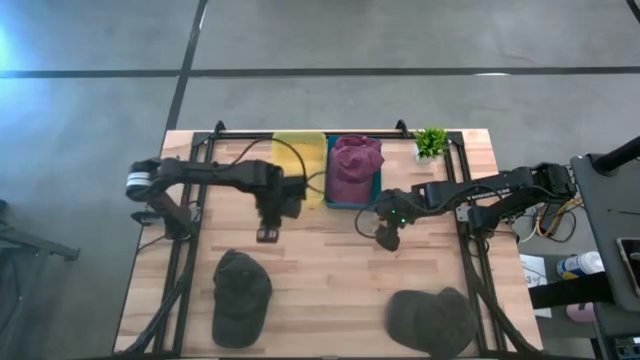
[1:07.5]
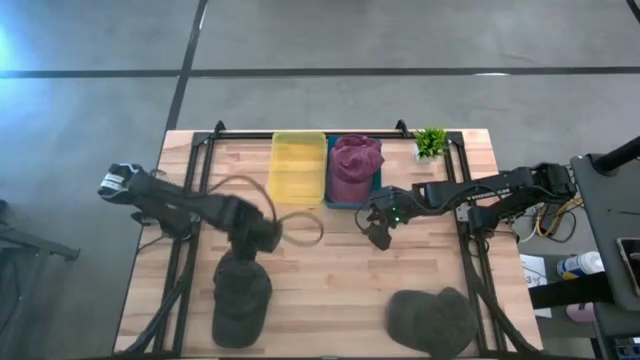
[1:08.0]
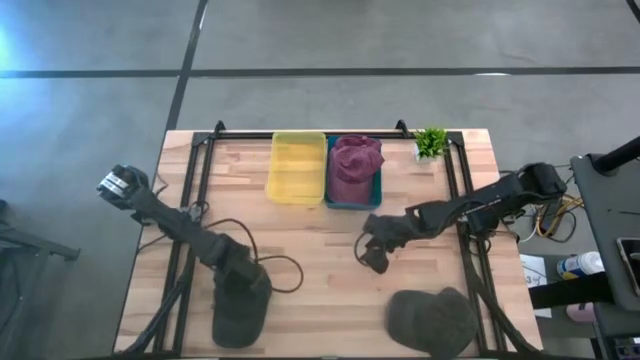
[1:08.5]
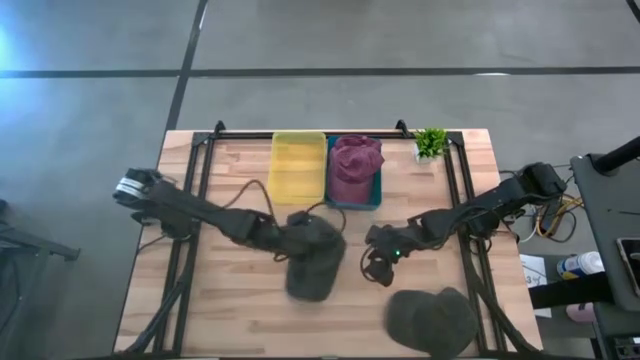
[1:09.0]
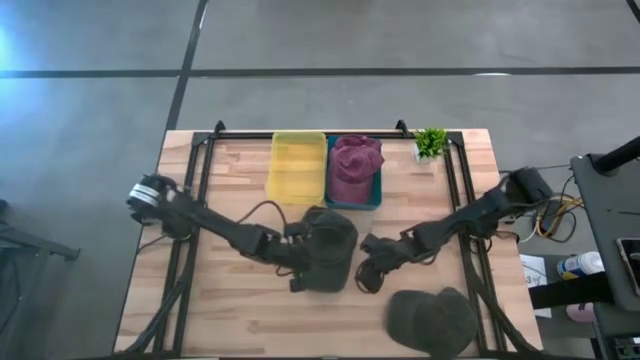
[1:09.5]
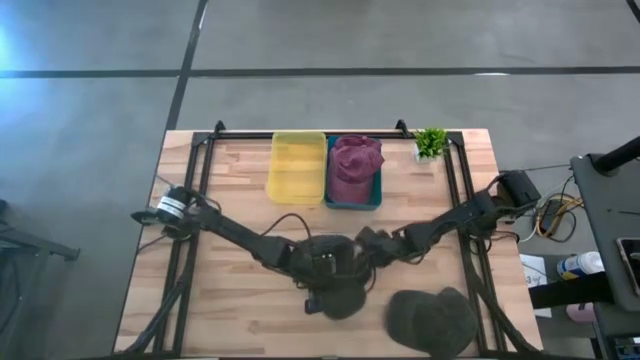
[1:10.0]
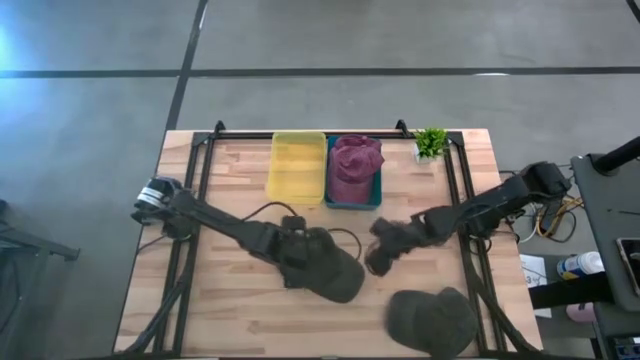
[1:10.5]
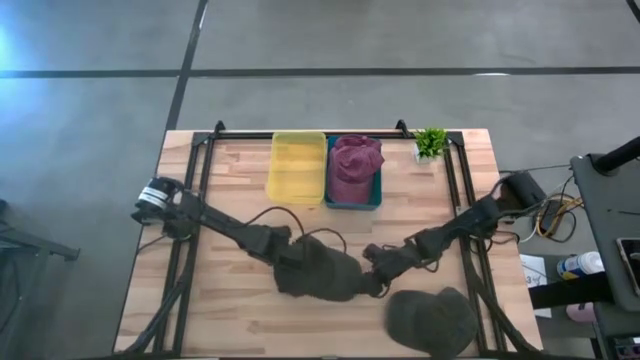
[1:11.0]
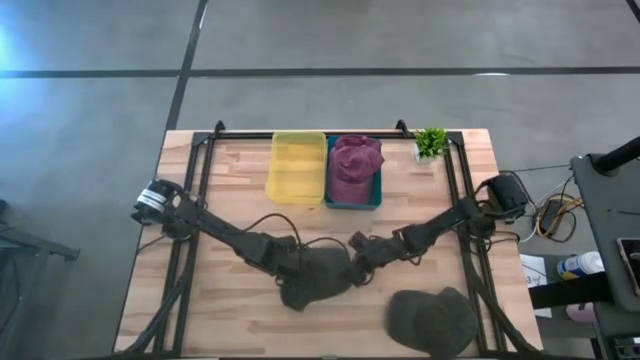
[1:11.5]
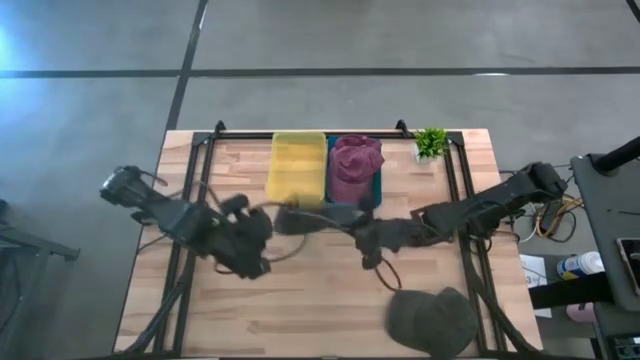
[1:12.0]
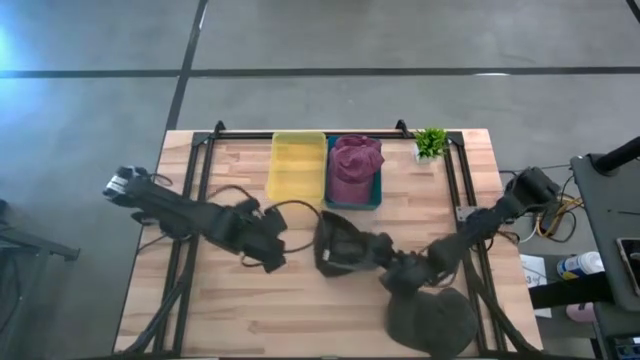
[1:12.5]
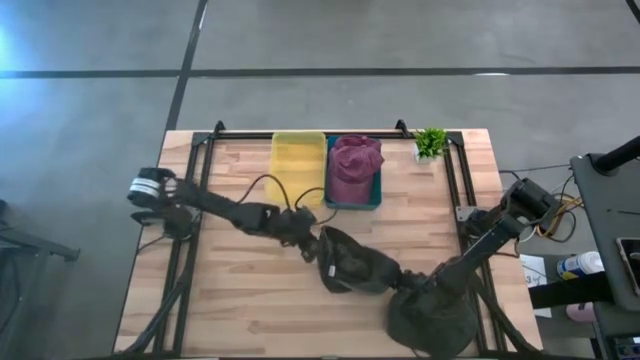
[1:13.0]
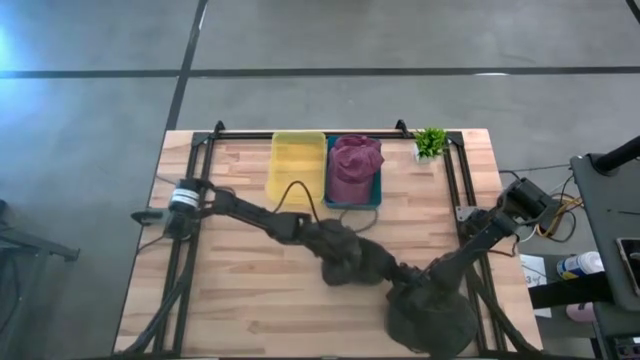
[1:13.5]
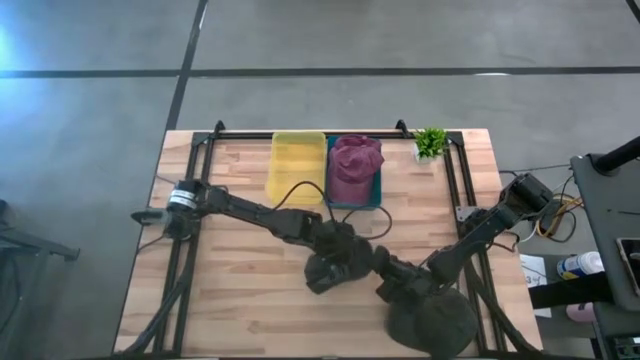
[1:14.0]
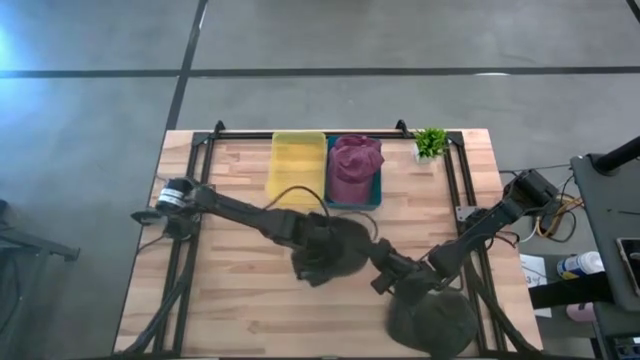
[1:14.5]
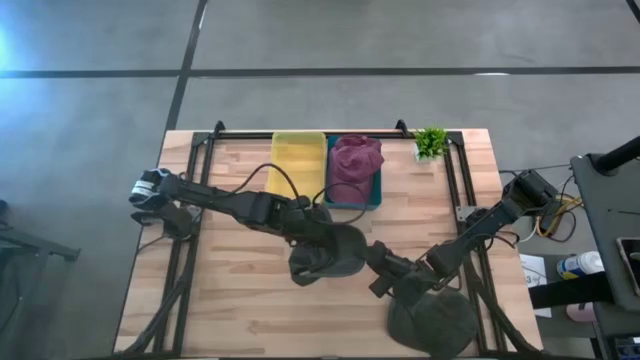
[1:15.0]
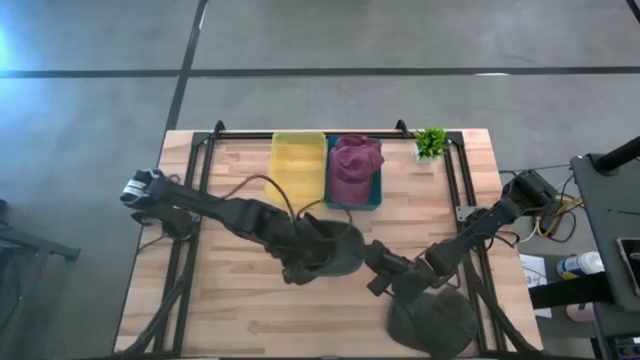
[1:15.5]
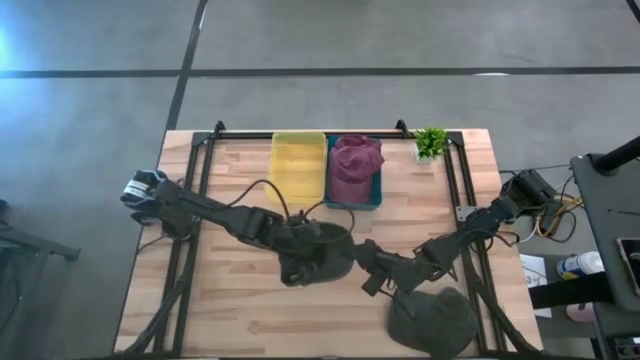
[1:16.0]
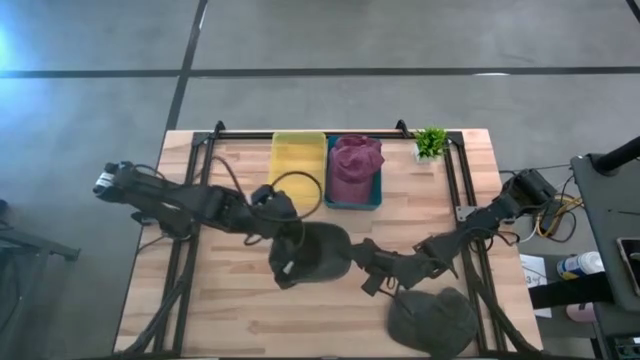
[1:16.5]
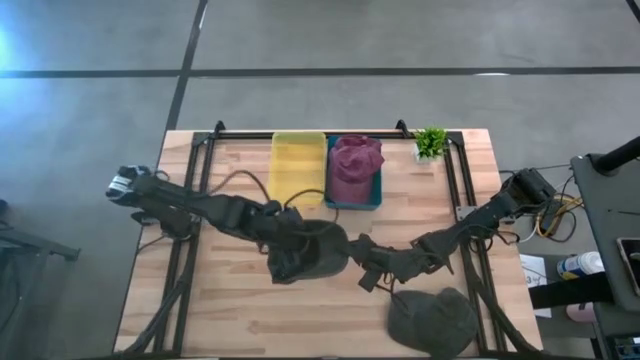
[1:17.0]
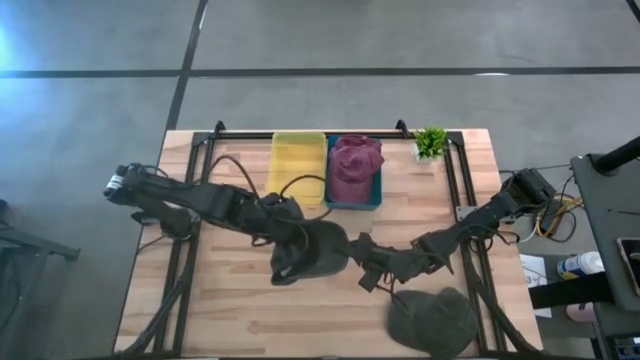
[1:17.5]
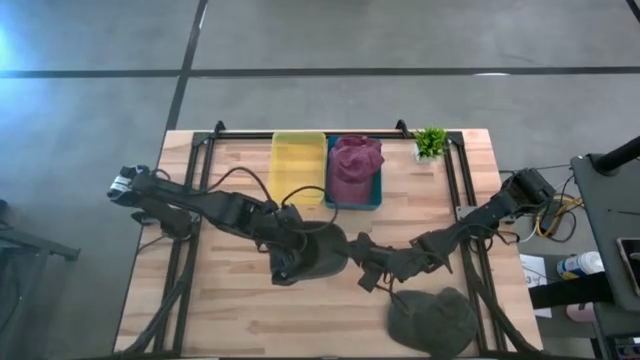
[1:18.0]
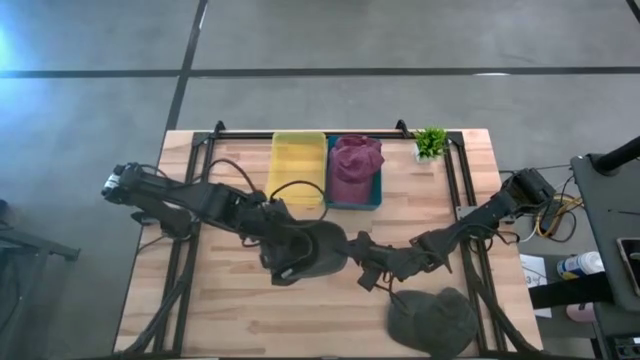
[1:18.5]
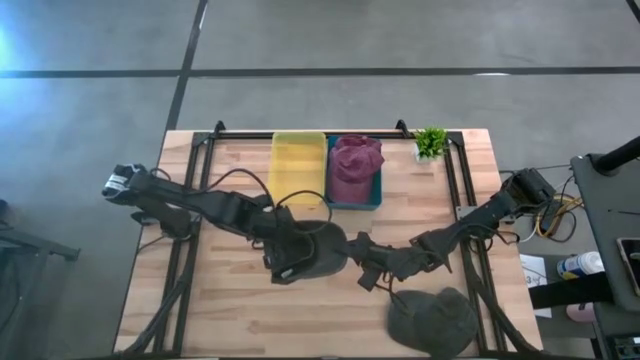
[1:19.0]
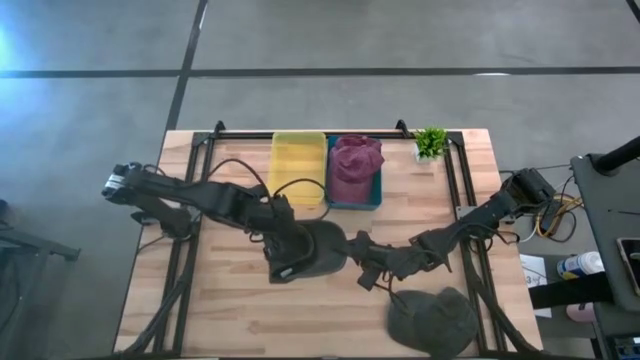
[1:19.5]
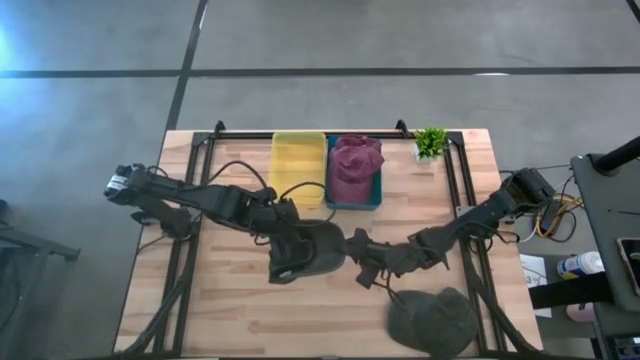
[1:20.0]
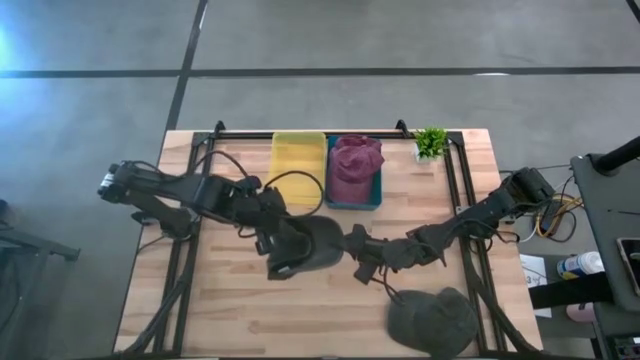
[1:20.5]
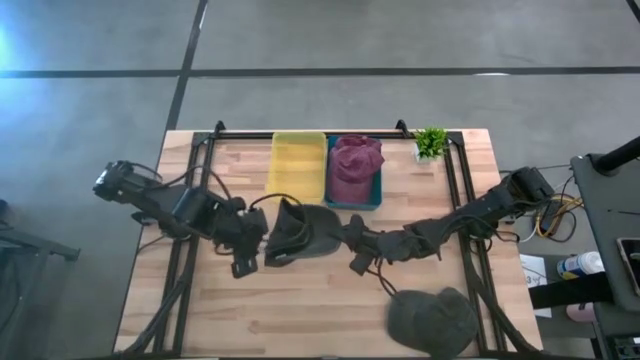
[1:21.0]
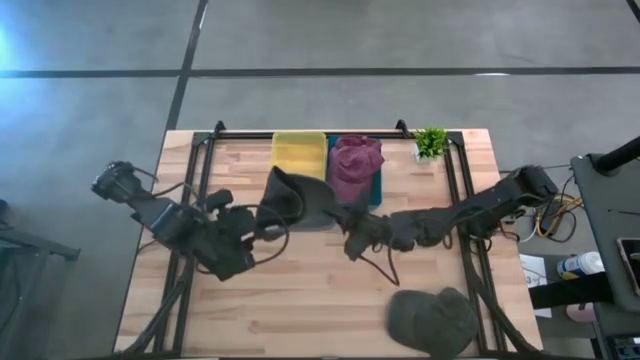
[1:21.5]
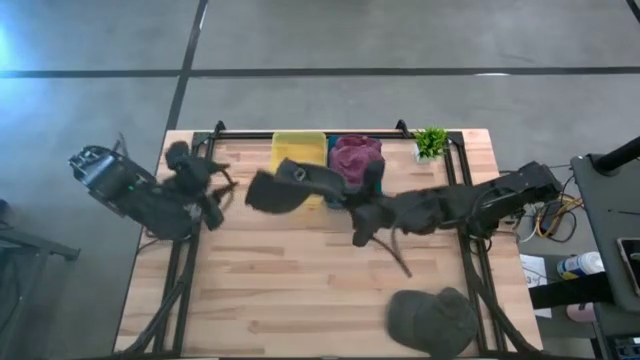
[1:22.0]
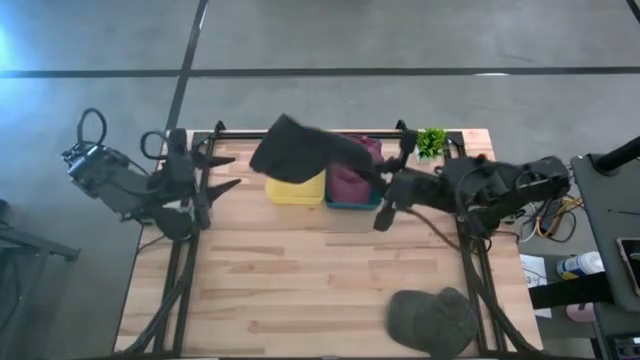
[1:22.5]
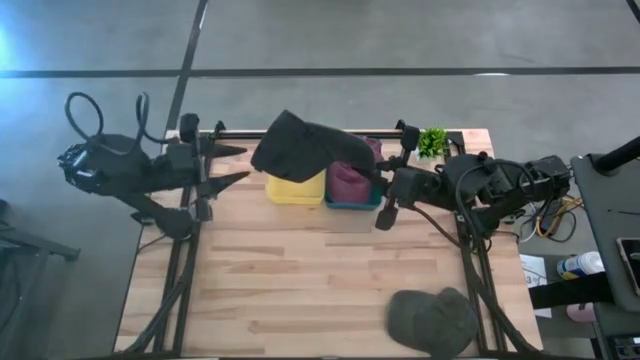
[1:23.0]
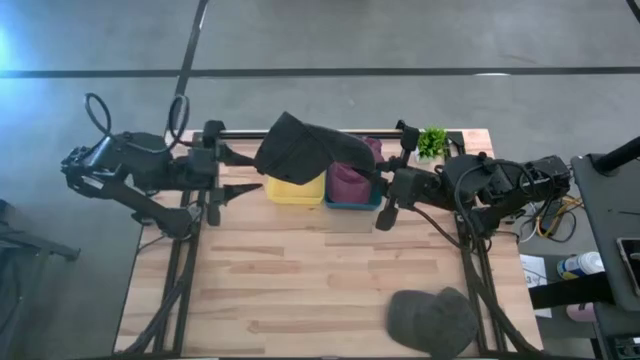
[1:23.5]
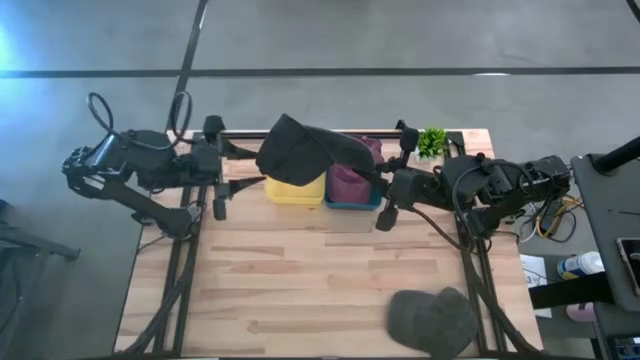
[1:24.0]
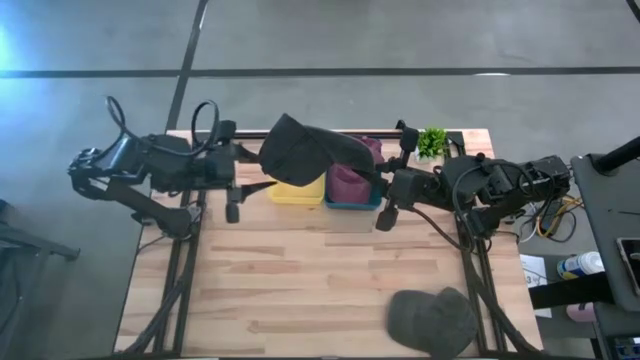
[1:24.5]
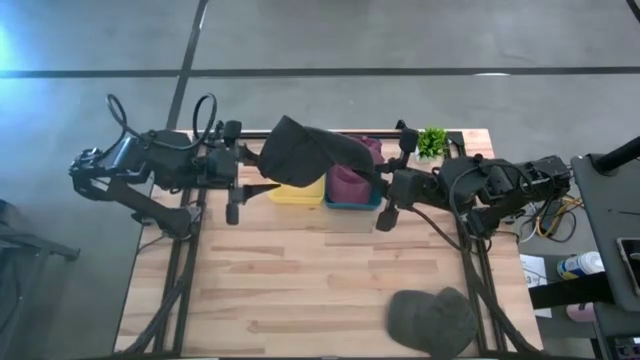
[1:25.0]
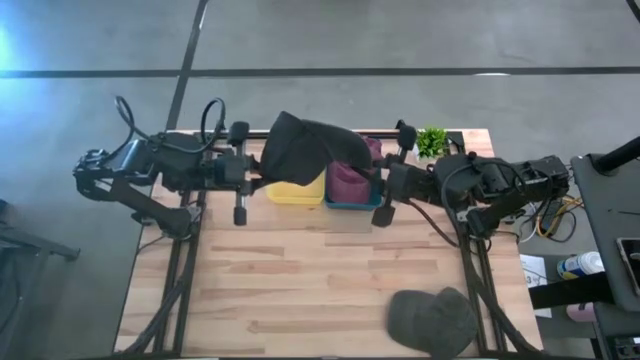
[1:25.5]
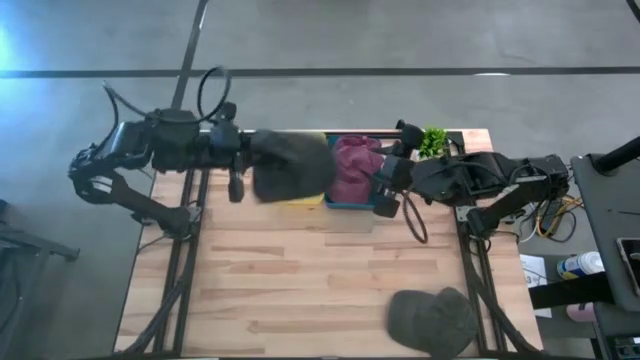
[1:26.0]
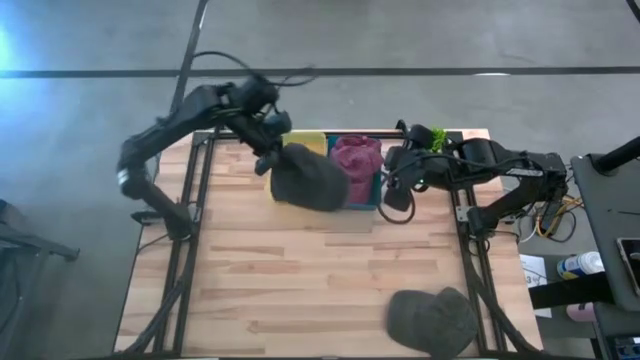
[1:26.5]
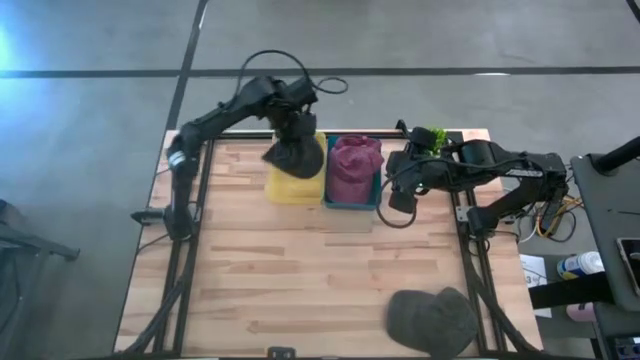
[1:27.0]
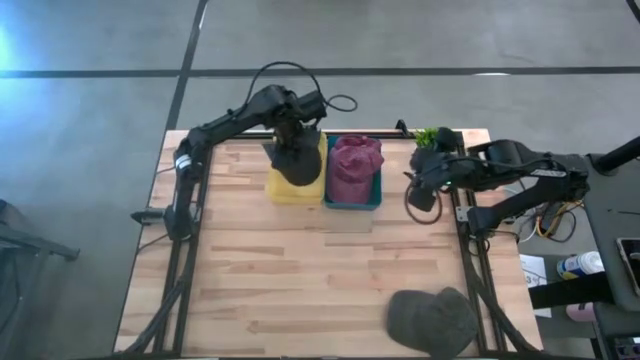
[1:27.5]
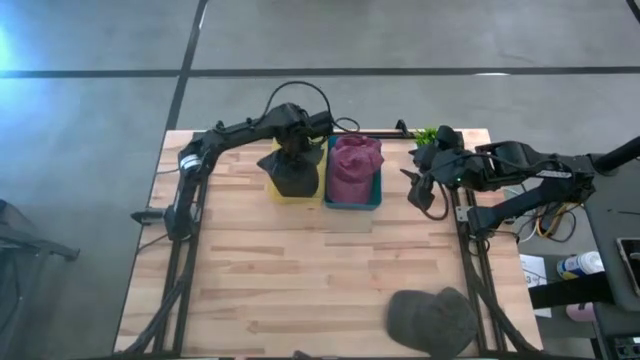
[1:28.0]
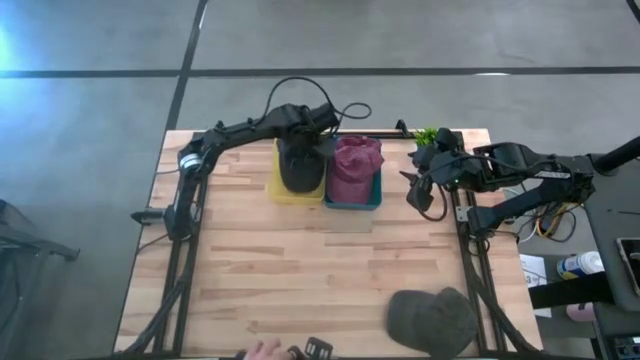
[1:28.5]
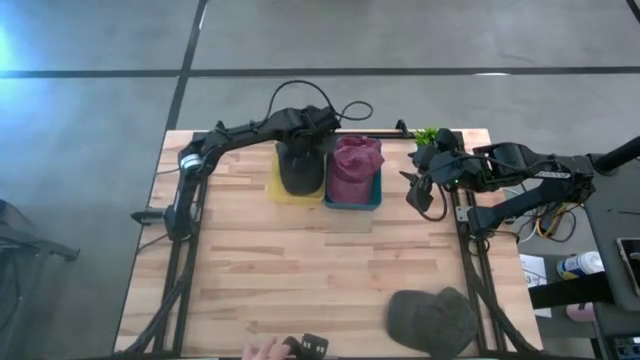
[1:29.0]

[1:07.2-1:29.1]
Task: Sort caps
Put the left black cap into the yellow bin
